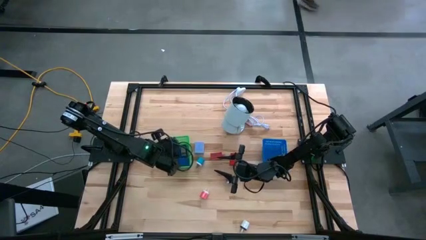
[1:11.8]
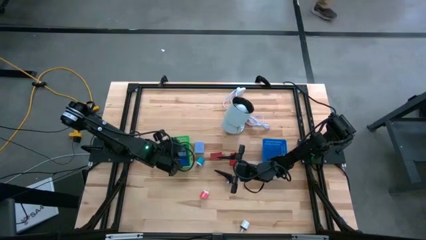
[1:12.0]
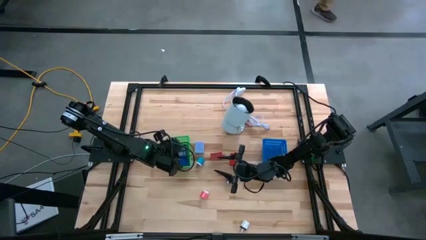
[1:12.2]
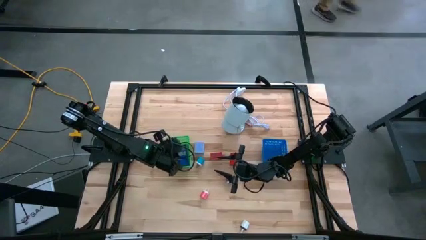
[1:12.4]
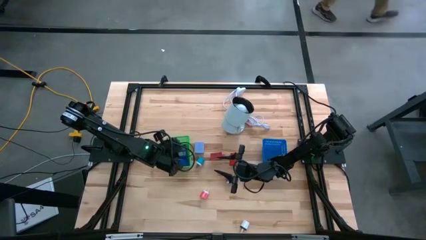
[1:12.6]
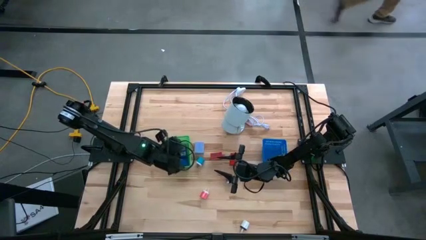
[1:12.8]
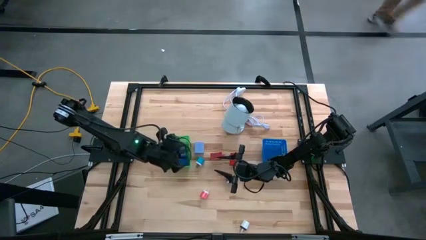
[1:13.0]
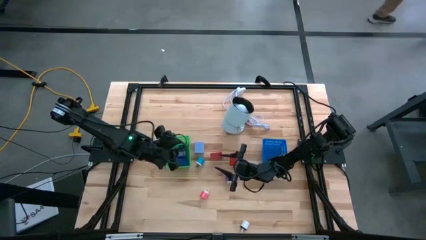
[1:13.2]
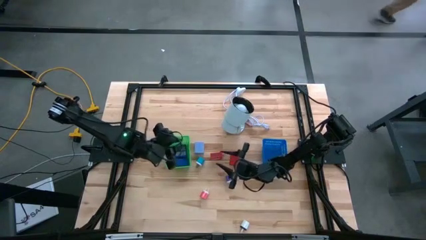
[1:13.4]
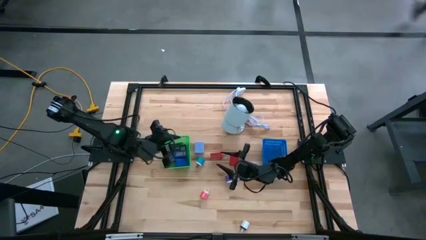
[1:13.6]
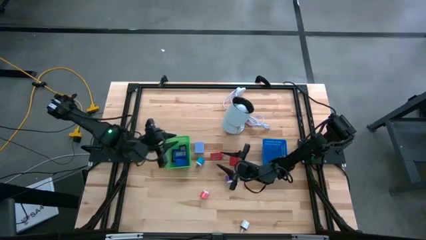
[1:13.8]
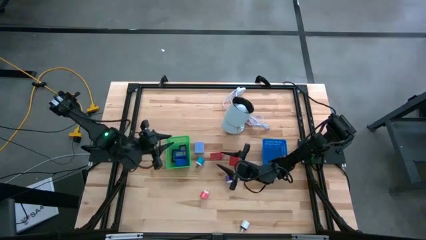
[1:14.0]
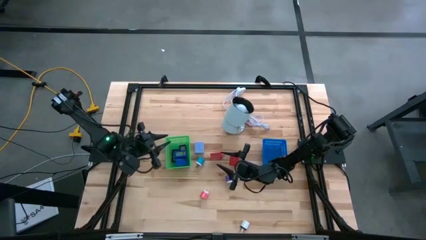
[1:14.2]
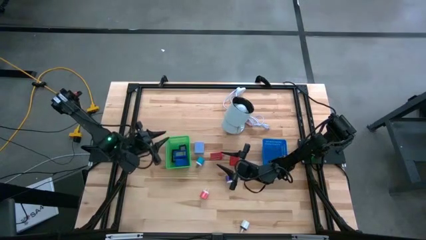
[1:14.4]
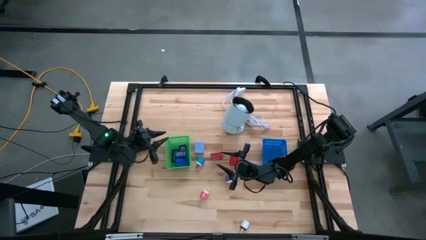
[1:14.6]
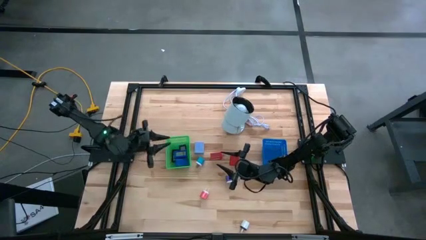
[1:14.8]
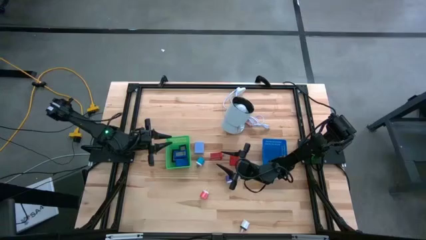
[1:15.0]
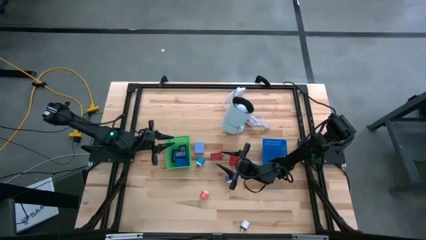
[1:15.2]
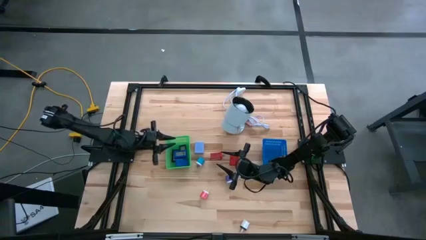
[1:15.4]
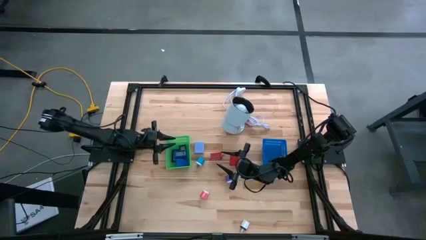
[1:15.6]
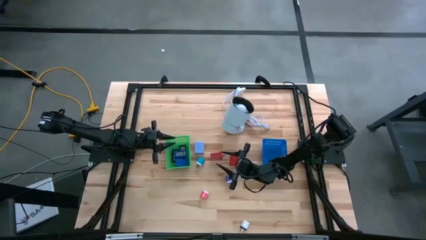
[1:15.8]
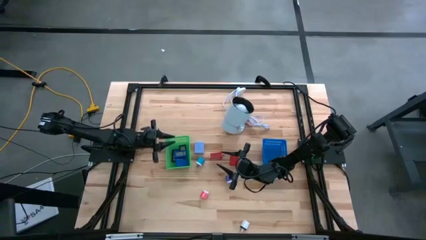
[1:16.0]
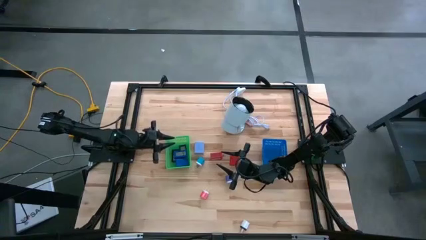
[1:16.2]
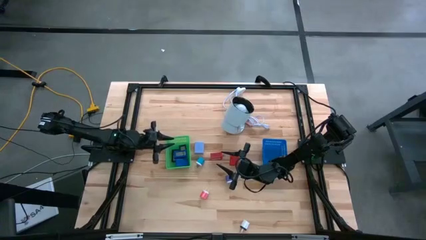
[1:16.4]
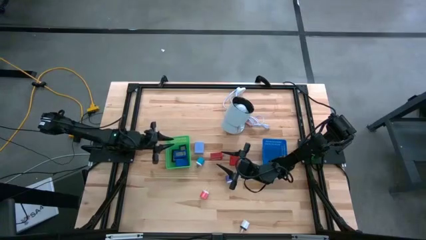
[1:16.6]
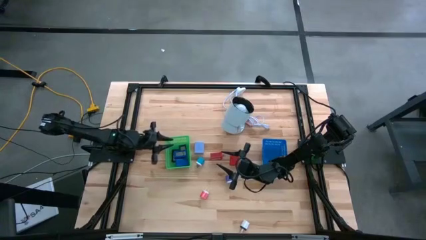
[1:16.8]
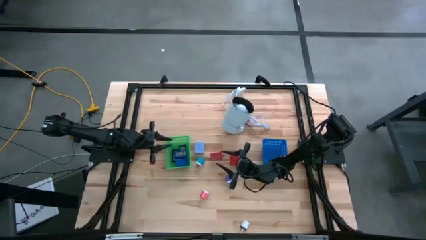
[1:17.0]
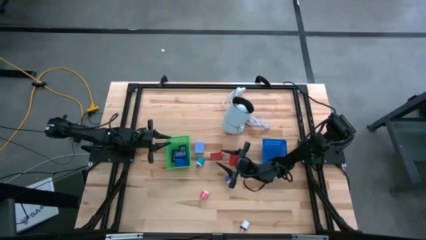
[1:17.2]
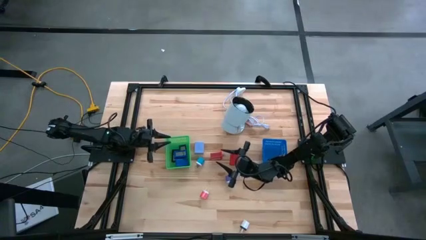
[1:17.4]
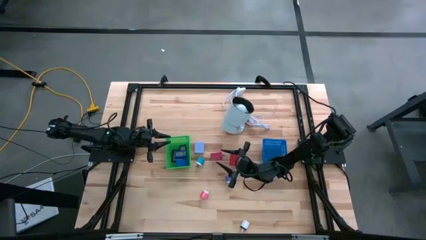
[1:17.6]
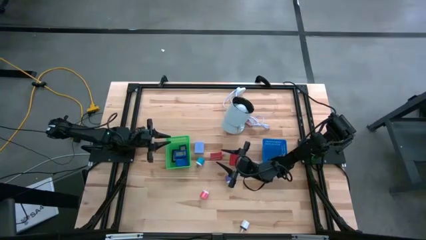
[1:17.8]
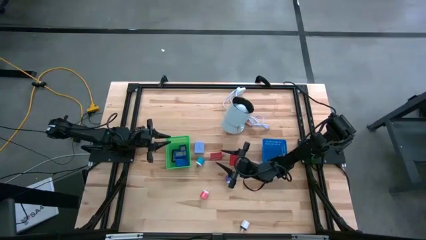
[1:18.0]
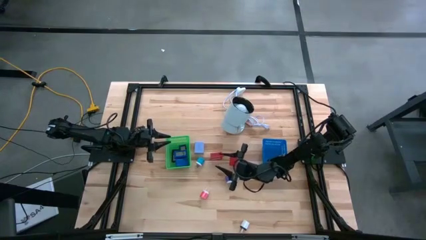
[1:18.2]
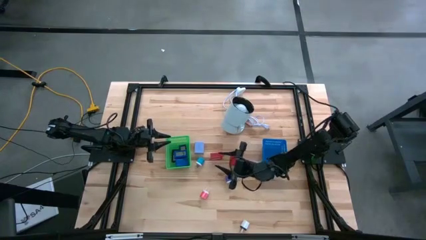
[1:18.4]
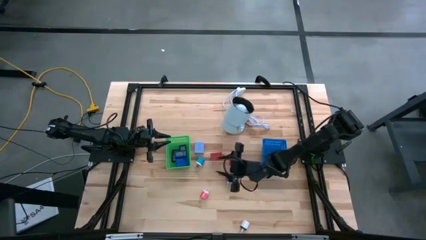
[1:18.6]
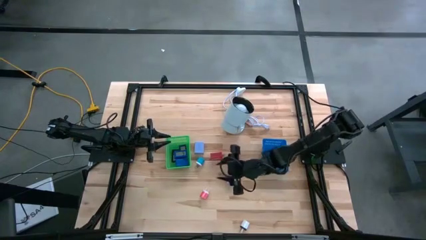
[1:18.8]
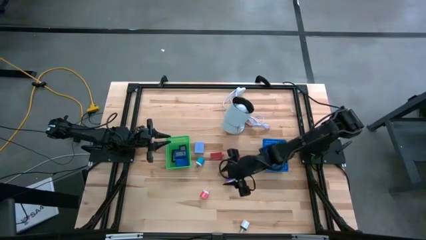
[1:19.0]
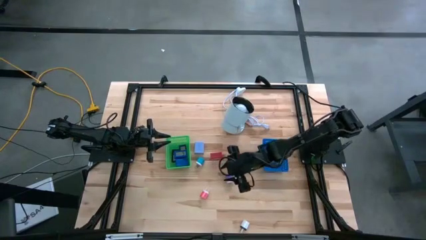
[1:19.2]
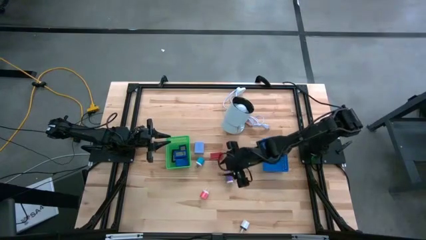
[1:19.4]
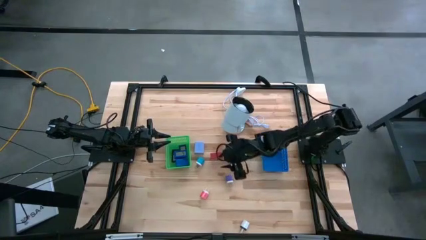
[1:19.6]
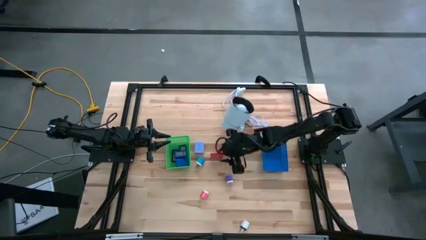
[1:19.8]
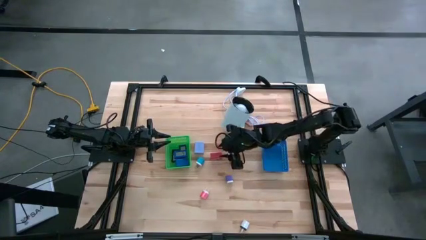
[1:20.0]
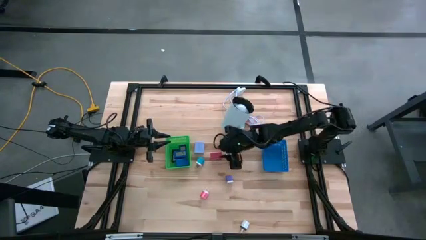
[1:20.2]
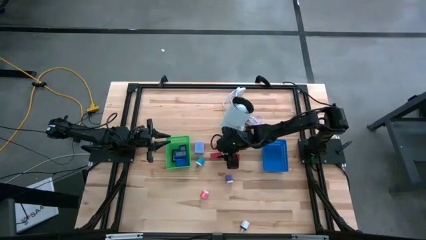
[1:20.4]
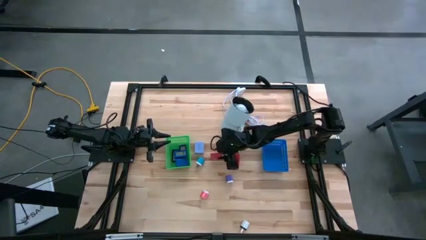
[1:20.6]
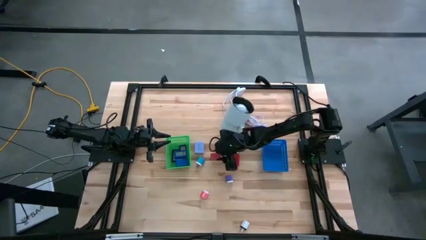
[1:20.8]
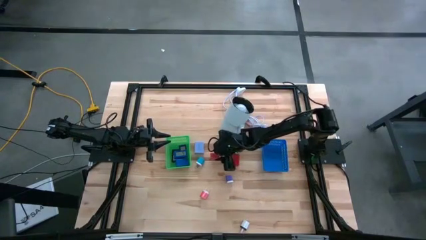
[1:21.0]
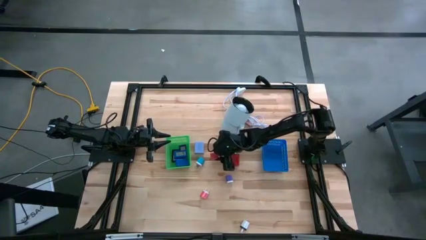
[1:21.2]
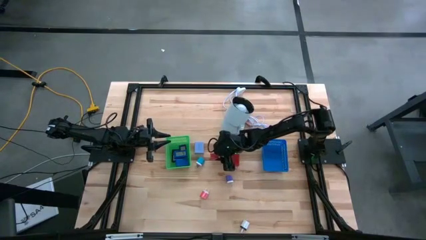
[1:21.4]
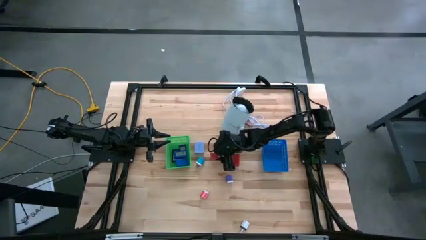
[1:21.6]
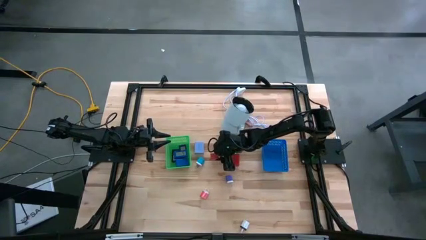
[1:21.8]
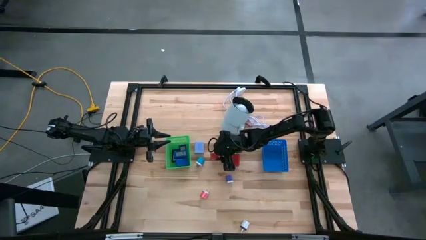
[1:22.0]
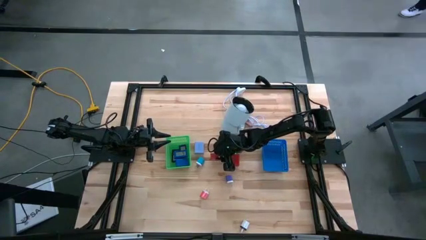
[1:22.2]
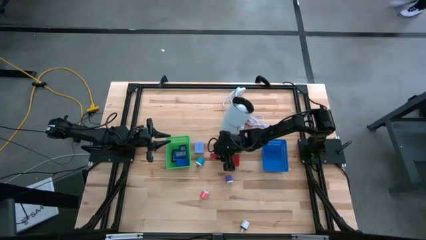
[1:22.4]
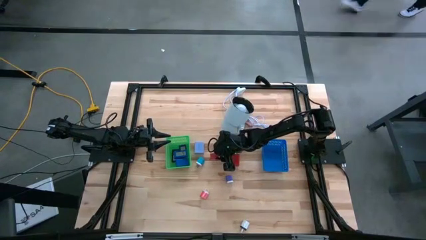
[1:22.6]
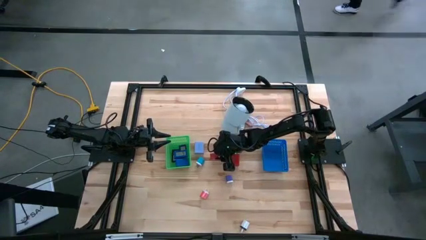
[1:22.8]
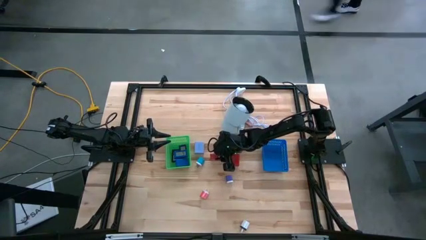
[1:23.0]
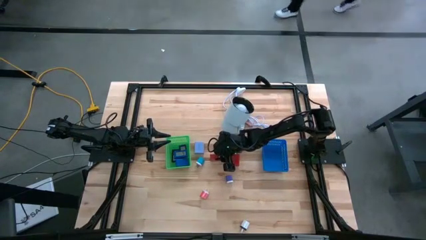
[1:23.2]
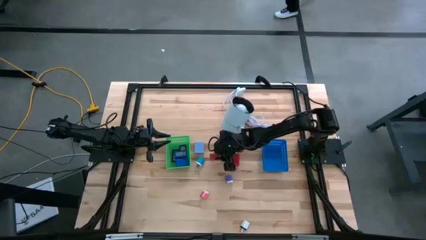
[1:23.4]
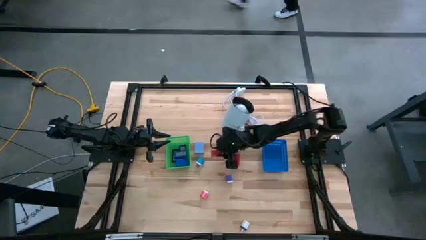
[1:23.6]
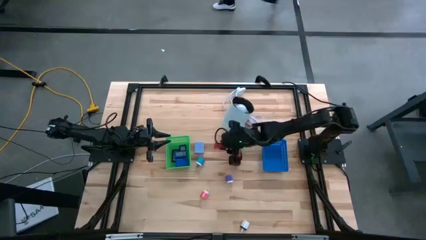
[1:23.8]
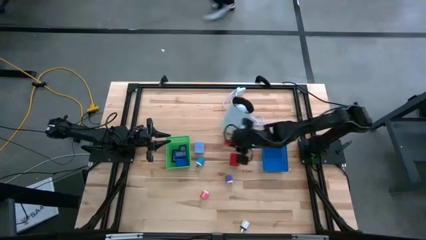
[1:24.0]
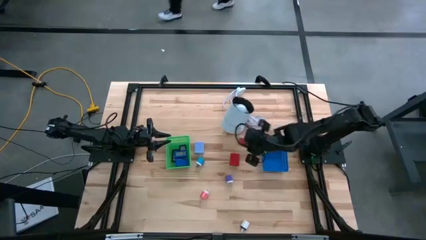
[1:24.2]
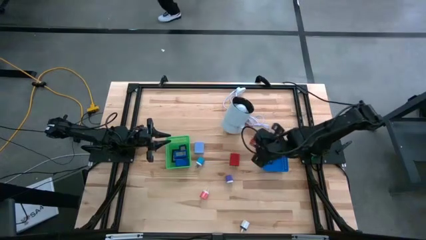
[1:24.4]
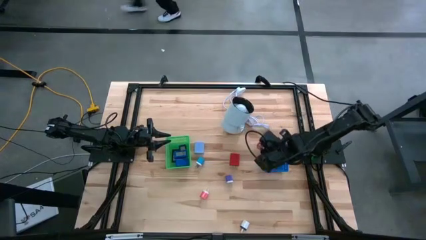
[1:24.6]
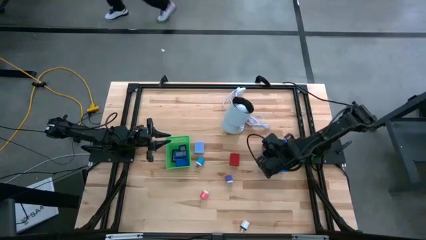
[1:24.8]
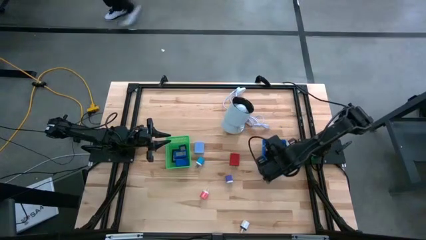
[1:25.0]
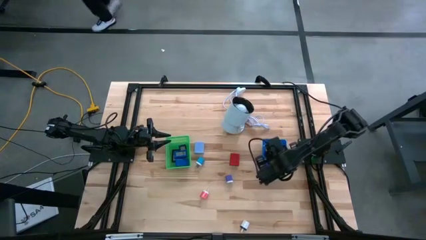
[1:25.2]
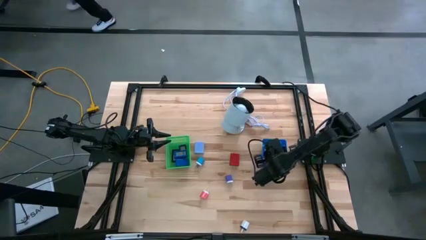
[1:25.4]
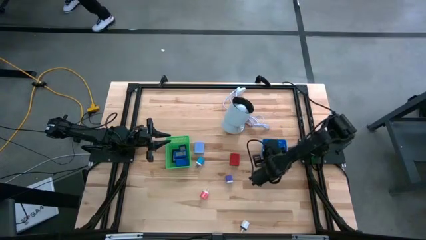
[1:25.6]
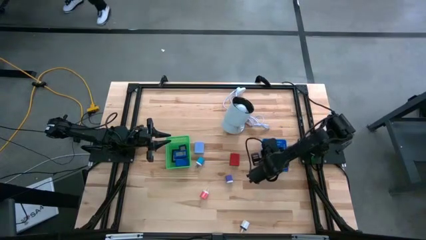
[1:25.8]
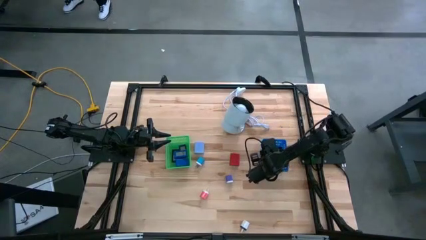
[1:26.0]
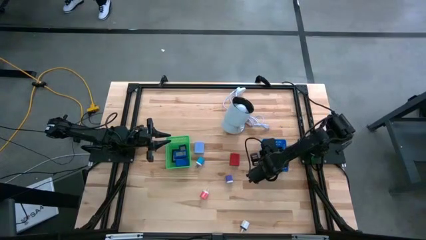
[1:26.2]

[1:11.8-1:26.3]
Task: Pick & Place Office items
Put the left red charger adapter into the blue bin
